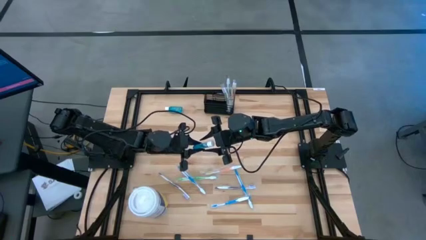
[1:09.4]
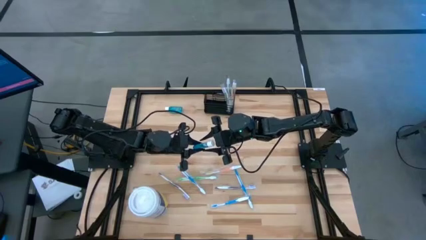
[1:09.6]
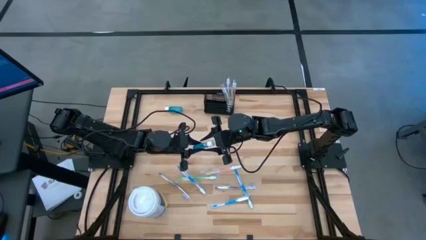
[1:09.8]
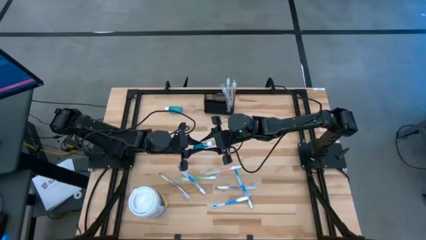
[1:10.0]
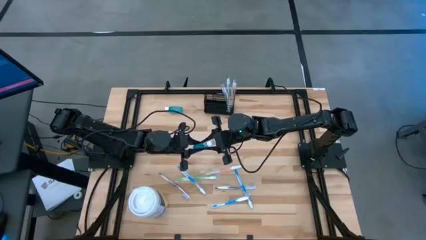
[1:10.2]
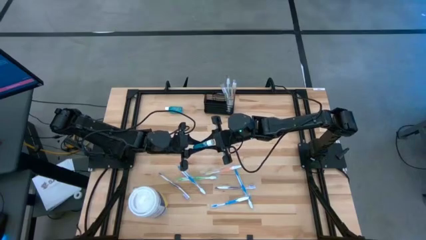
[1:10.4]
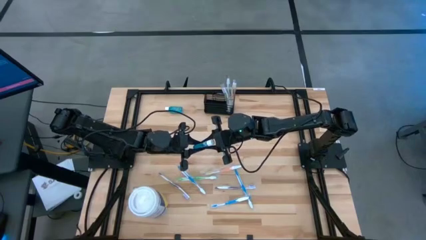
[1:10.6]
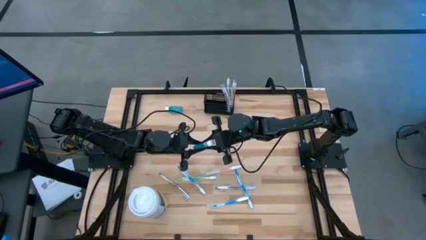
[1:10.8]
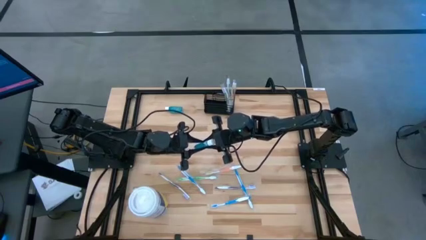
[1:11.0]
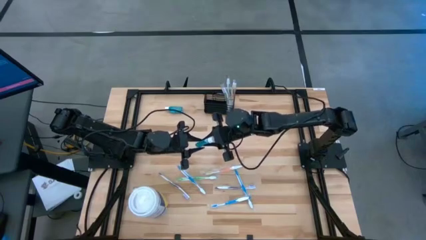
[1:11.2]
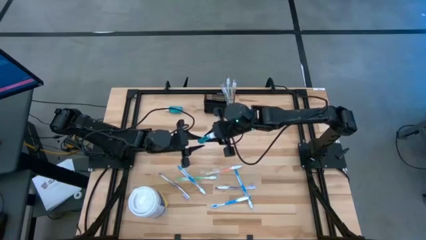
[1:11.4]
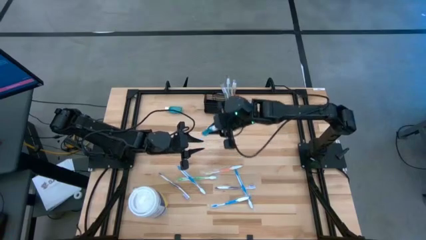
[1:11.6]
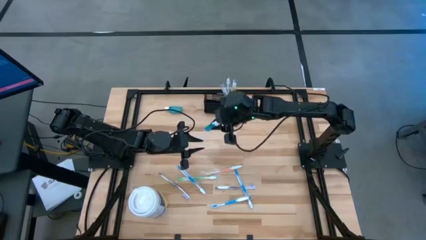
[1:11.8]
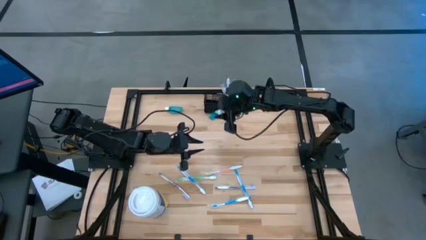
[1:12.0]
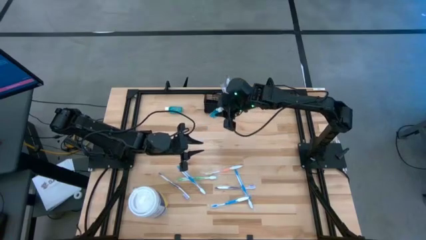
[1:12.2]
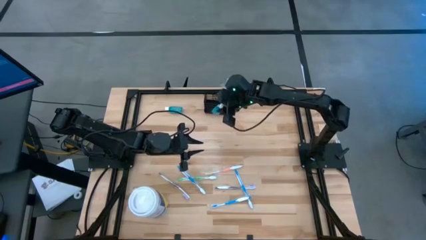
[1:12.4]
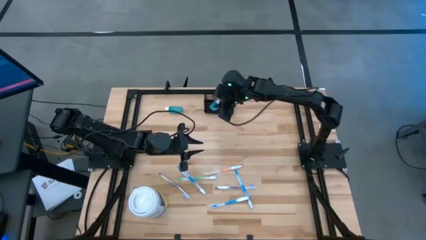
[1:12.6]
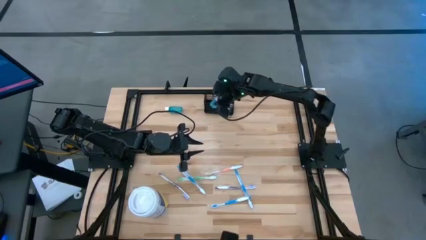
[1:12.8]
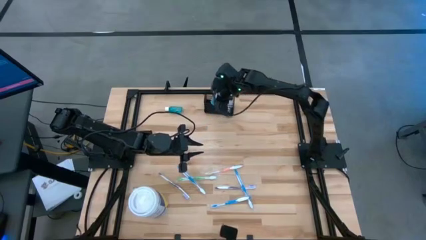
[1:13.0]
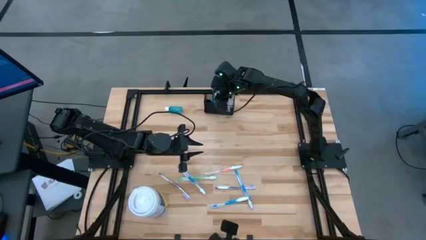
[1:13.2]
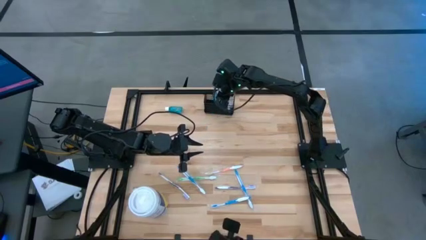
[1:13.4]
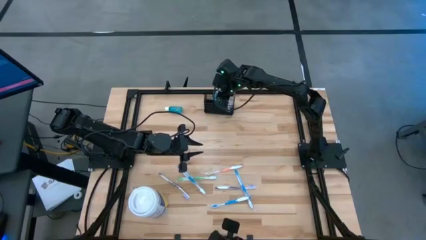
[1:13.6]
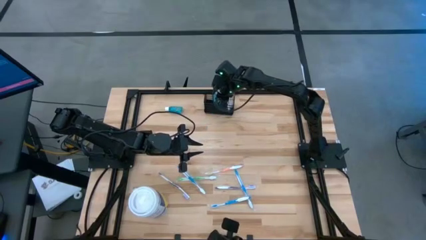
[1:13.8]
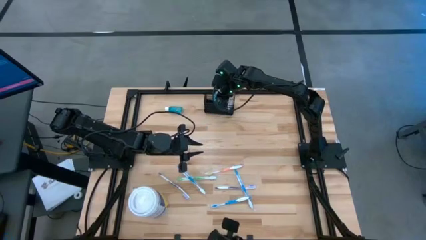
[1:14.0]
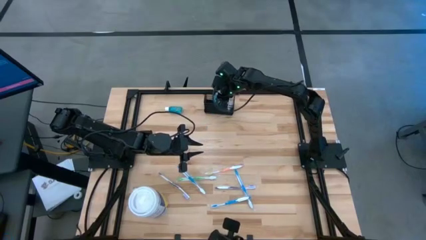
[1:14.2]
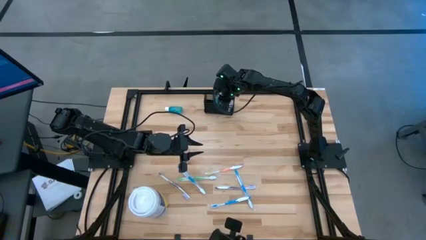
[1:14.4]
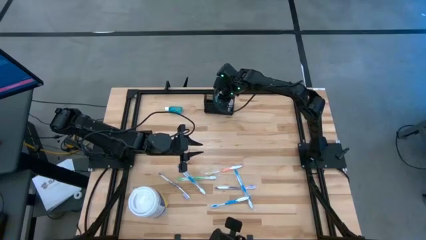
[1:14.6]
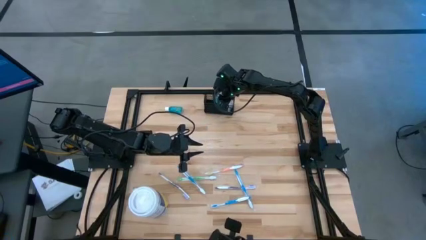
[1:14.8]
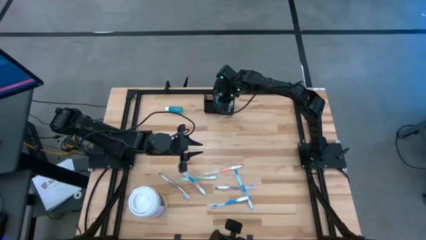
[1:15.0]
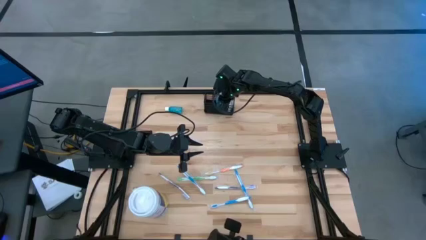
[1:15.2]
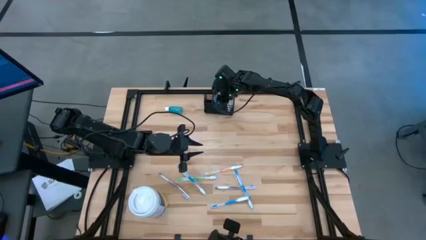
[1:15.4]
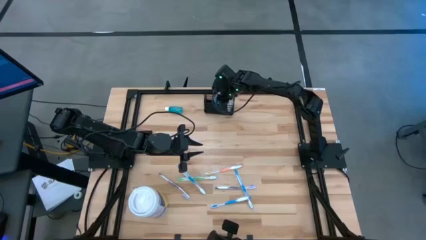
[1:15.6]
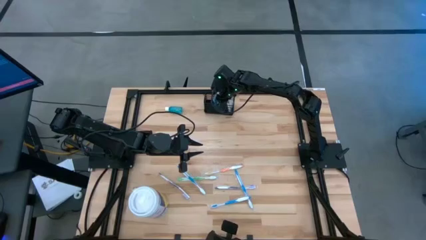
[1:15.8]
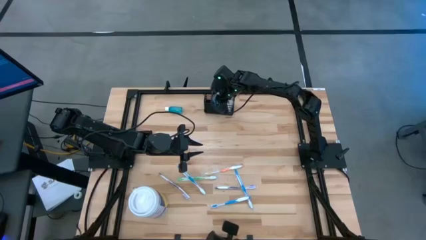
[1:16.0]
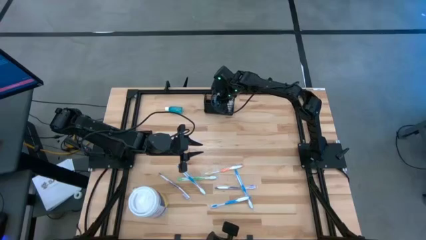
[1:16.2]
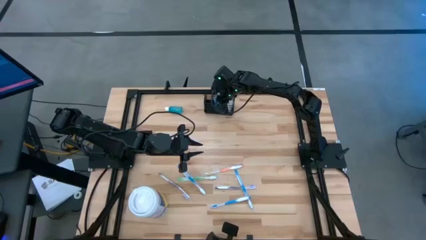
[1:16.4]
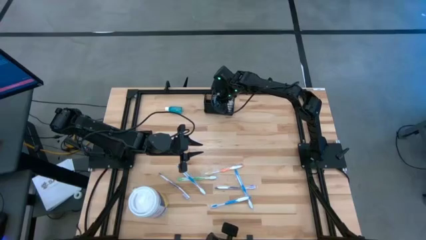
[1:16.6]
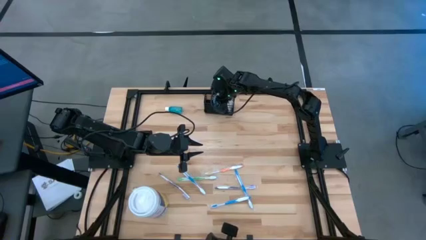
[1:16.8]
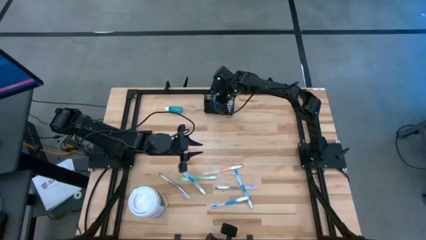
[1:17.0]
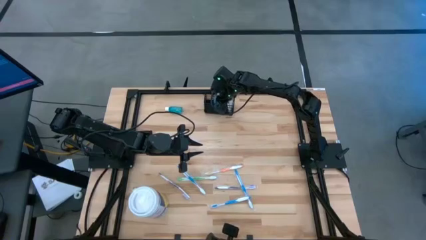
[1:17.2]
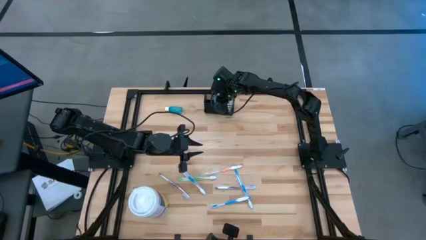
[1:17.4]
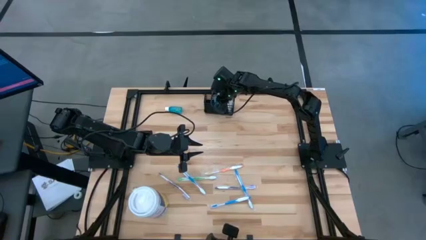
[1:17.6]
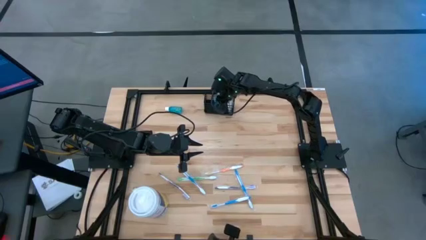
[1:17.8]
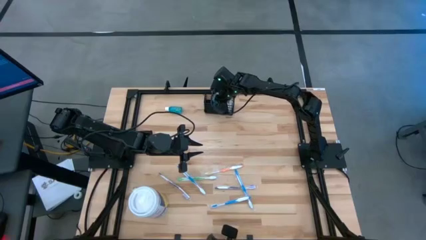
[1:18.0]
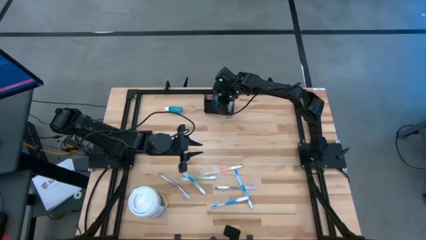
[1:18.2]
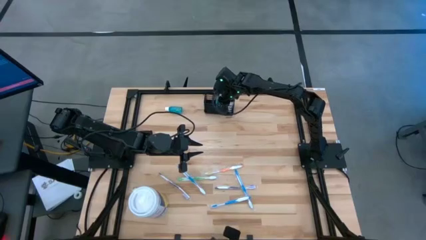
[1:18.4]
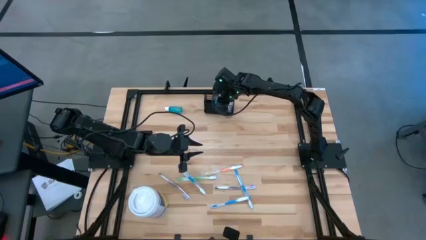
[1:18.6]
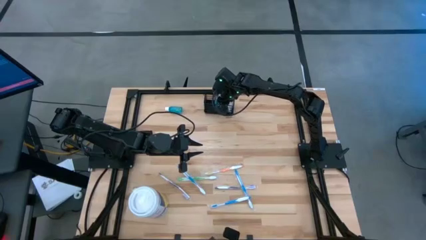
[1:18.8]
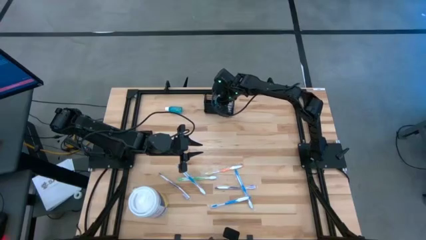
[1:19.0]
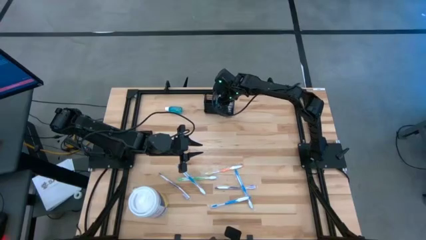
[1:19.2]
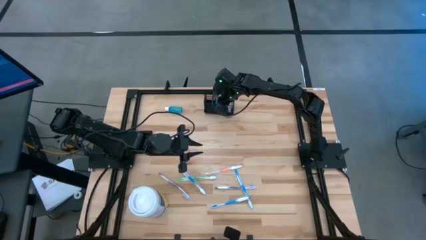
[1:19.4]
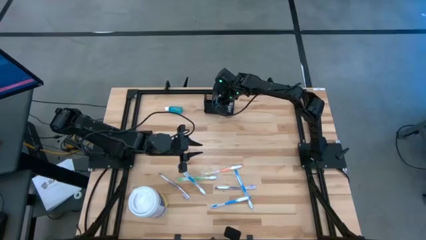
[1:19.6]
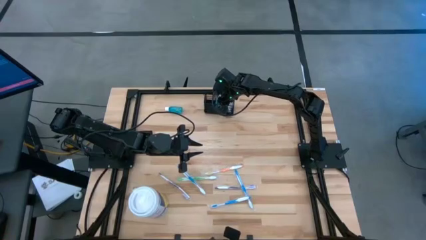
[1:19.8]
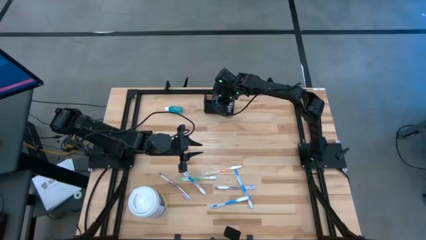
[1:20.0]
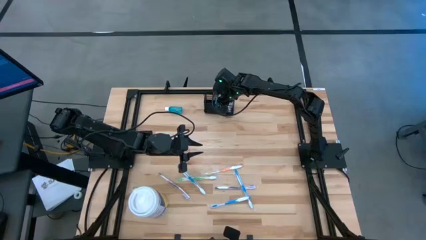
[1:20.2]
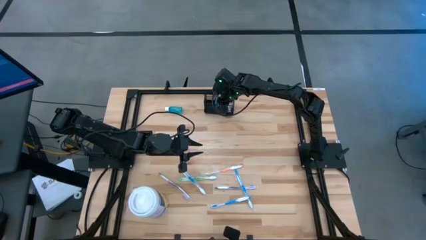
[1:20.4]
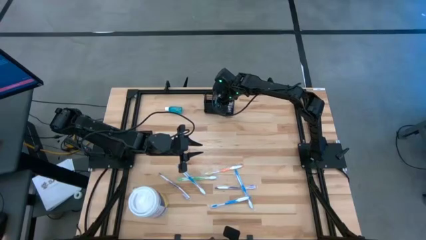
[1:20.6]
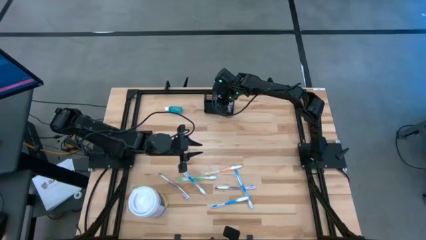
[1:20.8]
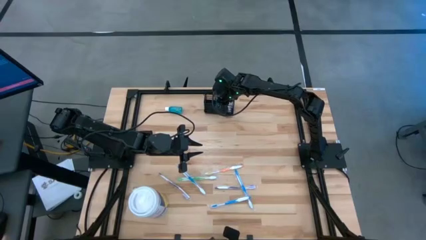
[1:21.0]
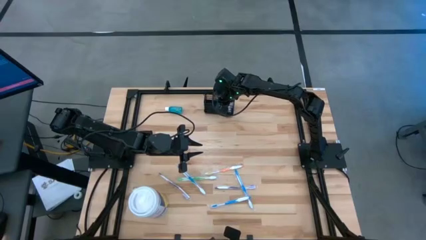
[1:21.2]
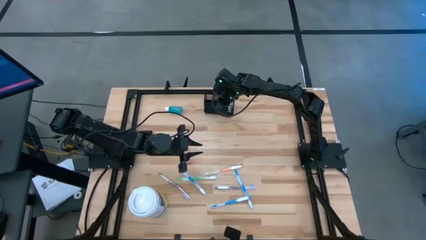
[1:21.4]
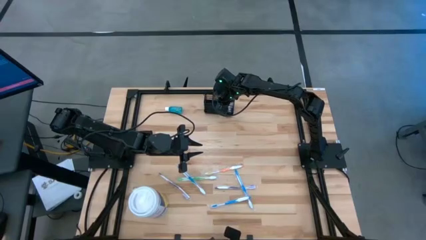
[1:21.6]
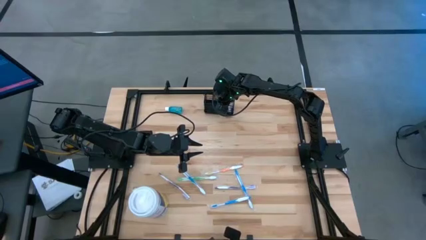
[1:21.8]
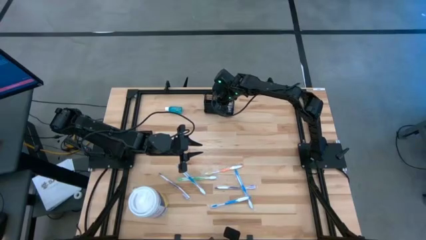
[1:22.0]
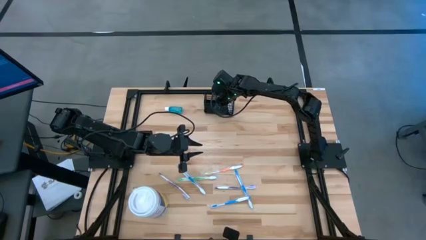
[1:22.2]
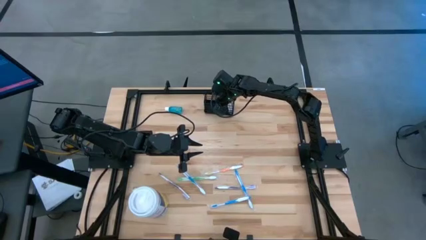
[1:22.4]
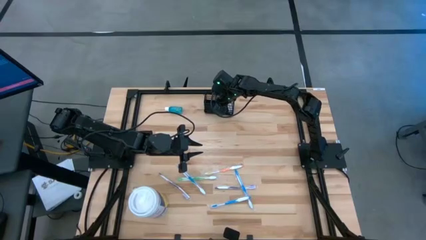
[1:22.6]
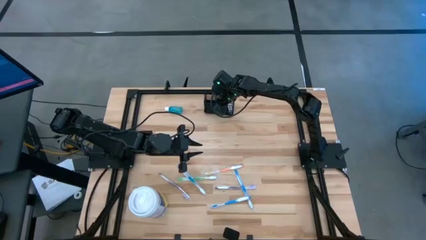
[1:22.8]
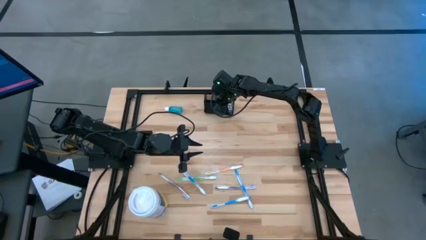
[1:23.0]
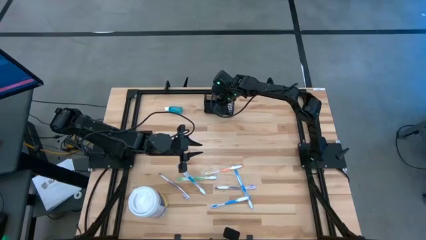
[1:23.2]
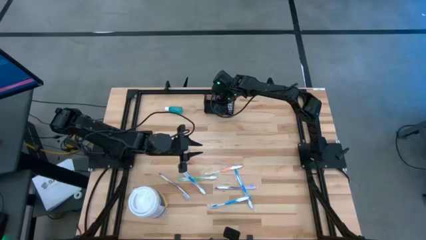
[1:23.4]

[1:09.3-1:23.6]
Task: Pick & Place toothbrushing station
Put the bottom blue mouthwash into the mesh organizer

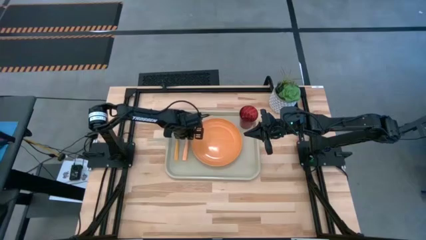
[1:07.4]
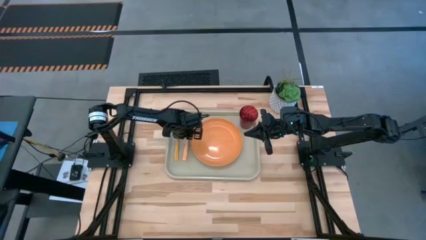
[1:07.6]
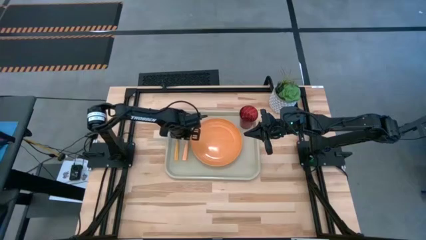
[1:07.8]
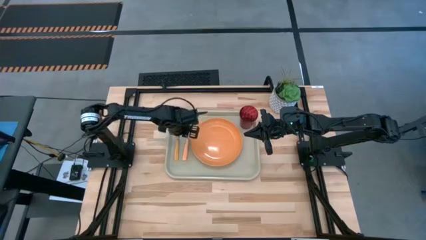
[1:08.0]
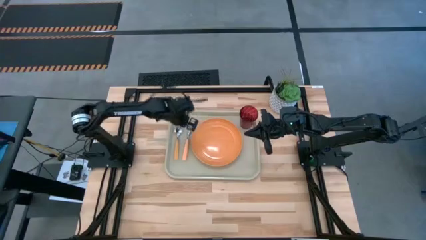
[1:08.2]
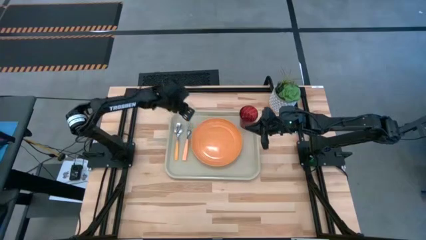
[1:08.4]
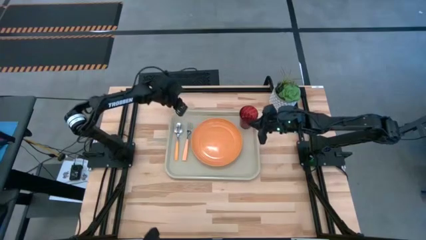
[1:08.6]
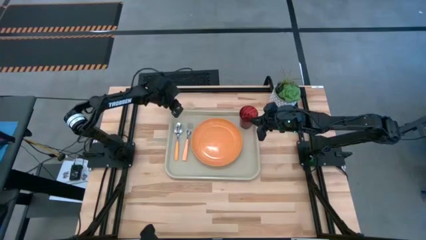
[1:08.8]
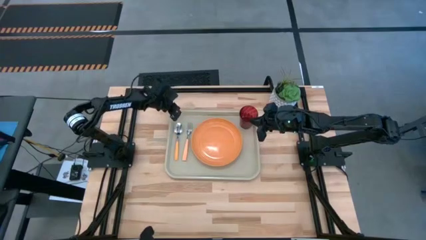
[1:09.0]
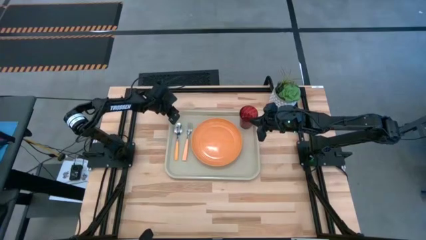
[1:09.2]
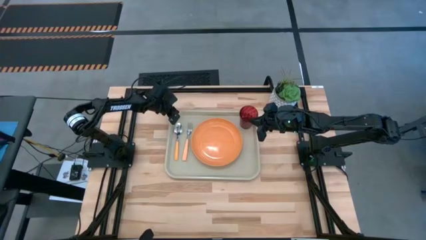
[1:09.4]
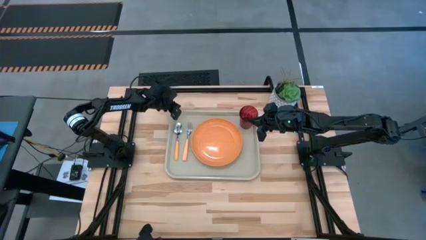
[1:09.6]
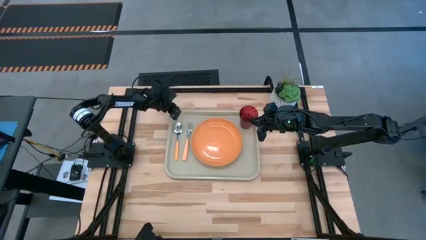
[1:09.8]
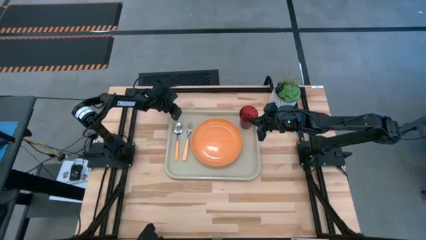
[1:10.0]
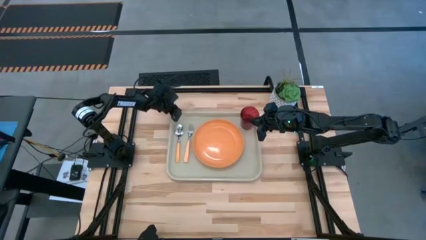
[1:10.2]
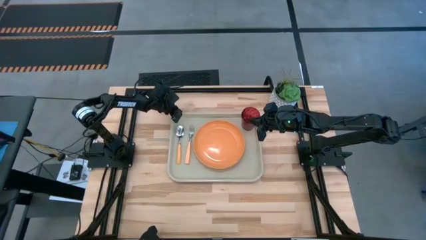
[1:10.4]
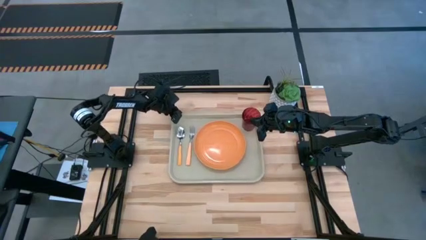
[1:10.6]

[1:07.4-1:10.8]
Task: Pick and place plate/cup/fork/spoon on tray
Adjust the gray serving tray
